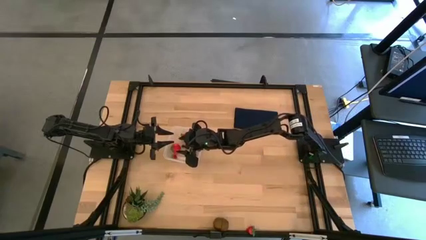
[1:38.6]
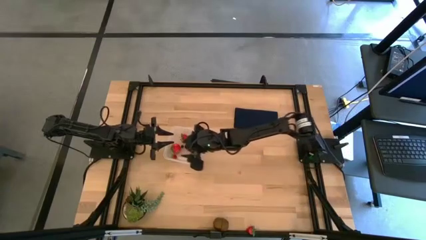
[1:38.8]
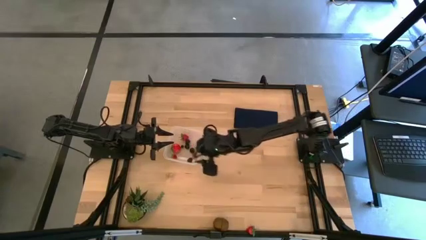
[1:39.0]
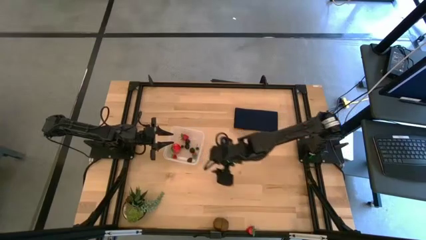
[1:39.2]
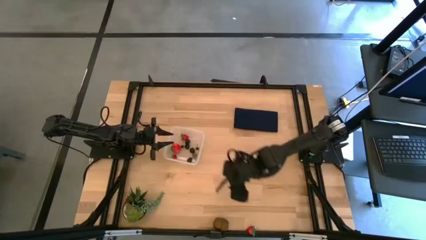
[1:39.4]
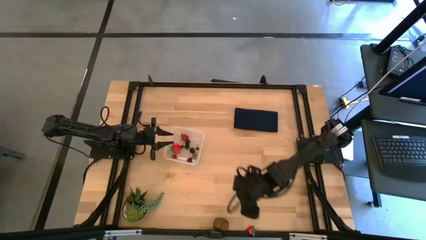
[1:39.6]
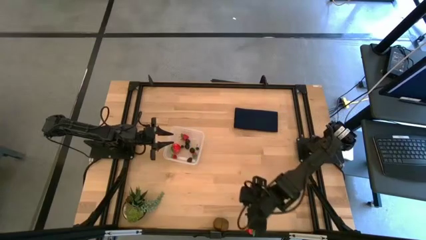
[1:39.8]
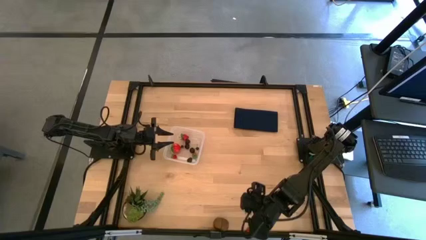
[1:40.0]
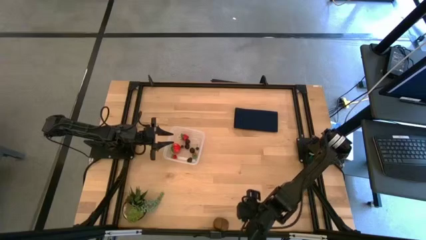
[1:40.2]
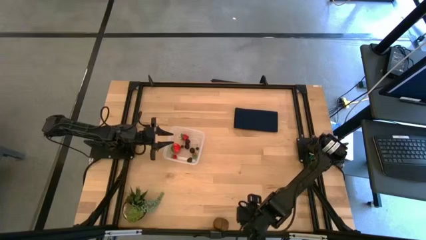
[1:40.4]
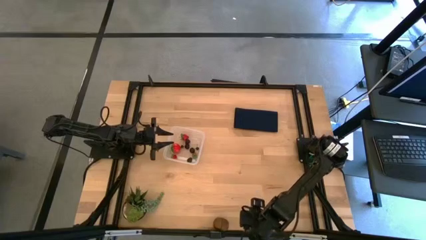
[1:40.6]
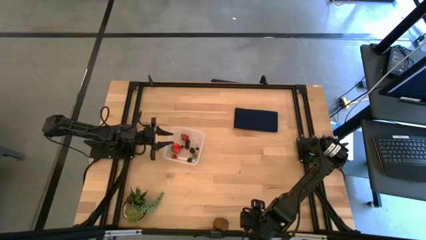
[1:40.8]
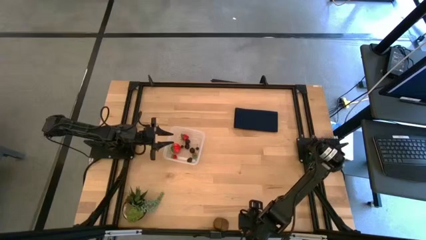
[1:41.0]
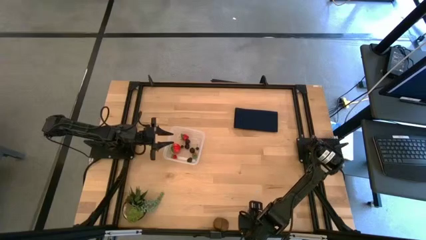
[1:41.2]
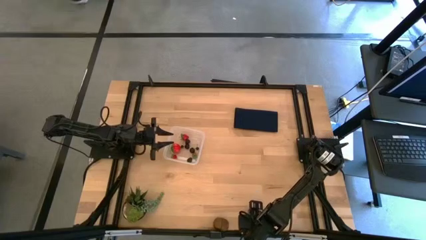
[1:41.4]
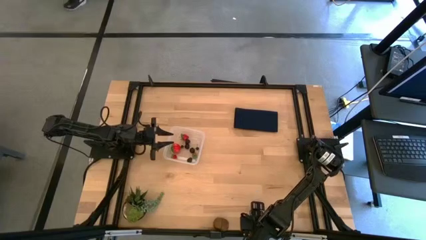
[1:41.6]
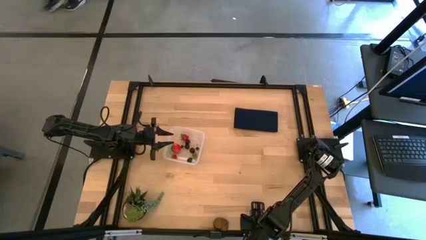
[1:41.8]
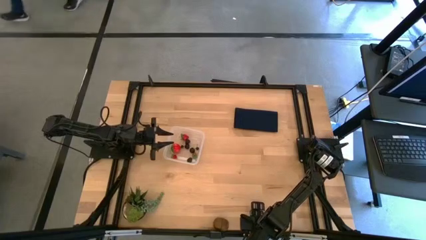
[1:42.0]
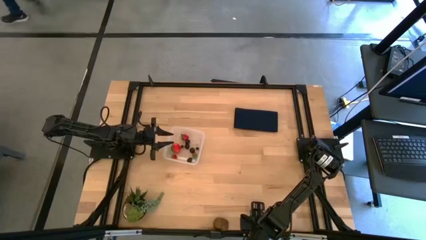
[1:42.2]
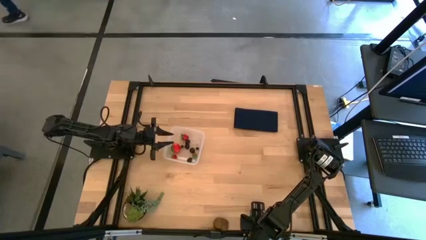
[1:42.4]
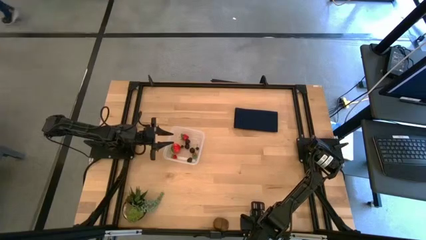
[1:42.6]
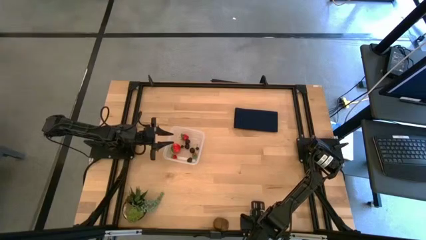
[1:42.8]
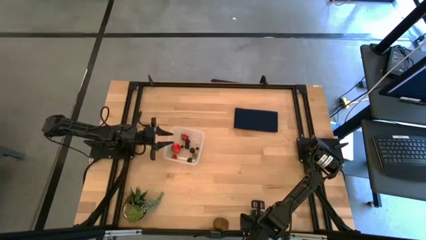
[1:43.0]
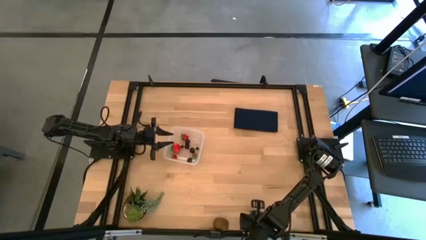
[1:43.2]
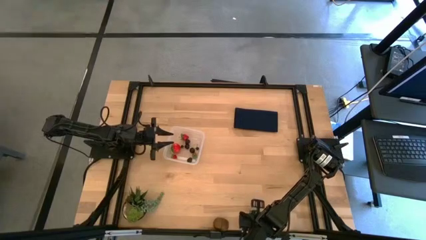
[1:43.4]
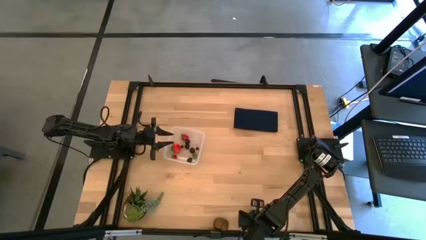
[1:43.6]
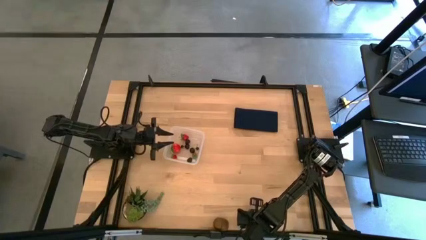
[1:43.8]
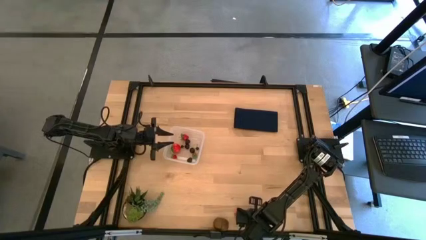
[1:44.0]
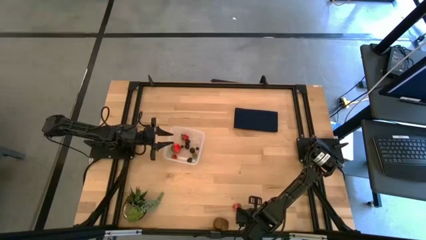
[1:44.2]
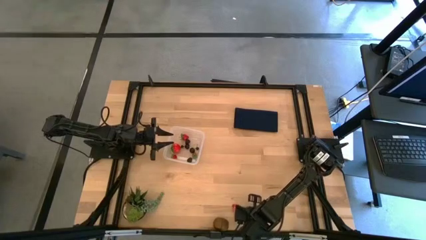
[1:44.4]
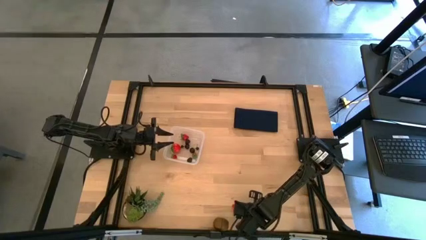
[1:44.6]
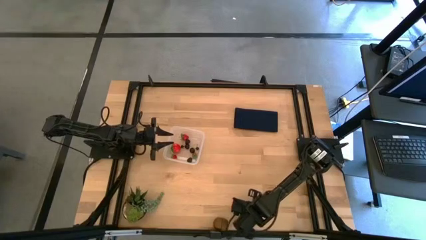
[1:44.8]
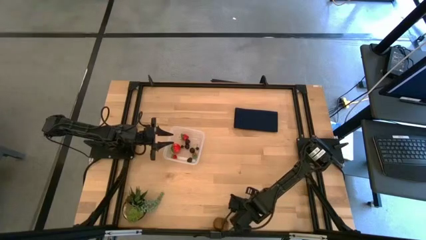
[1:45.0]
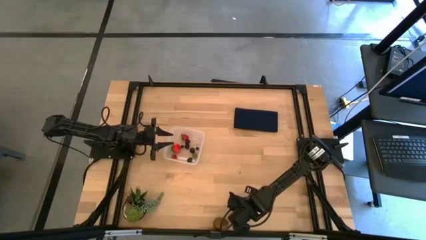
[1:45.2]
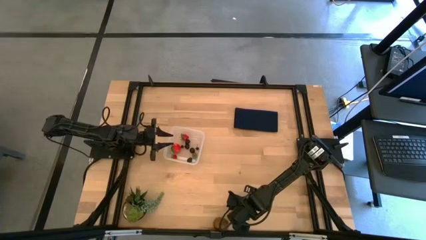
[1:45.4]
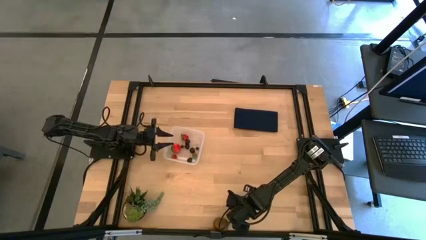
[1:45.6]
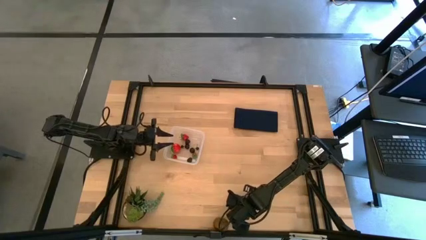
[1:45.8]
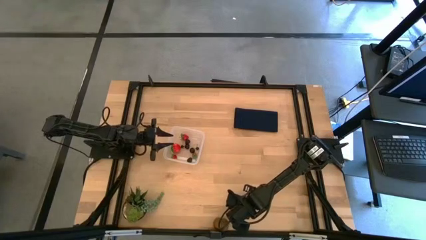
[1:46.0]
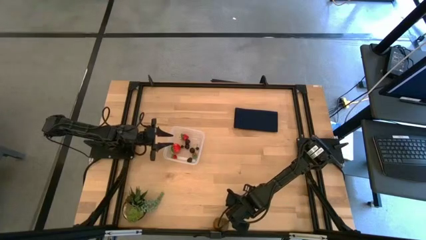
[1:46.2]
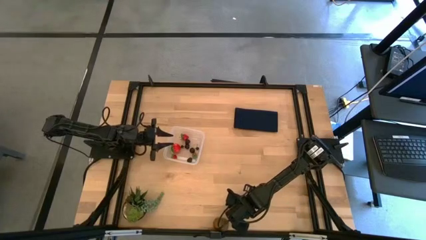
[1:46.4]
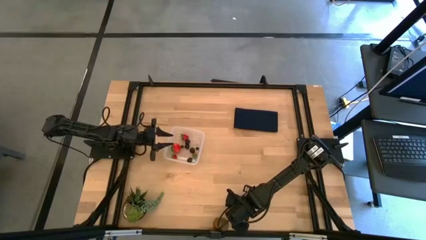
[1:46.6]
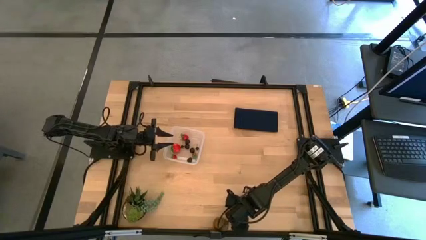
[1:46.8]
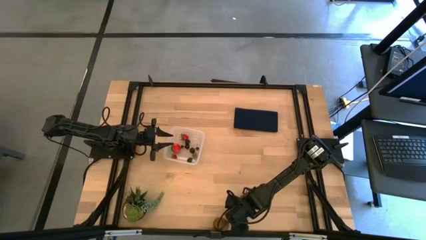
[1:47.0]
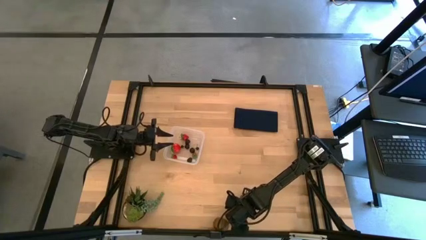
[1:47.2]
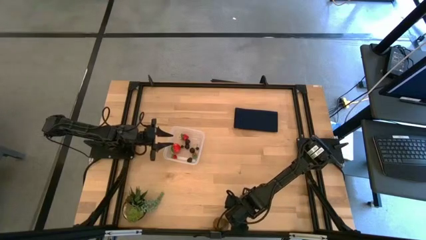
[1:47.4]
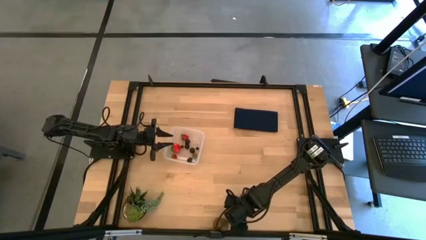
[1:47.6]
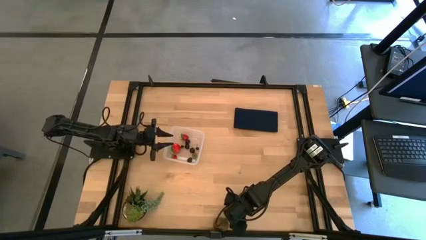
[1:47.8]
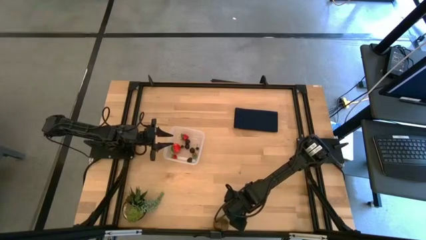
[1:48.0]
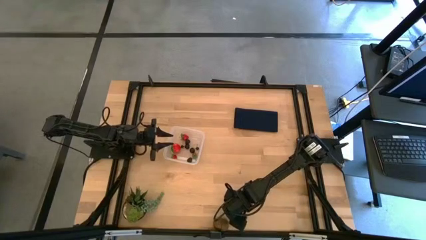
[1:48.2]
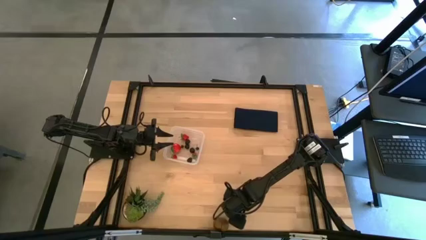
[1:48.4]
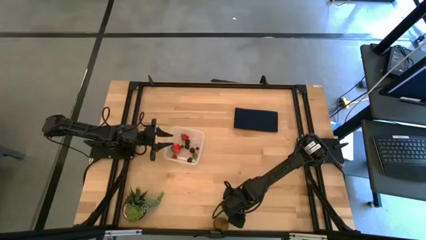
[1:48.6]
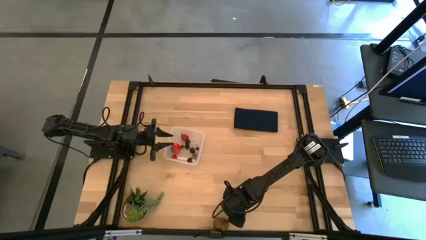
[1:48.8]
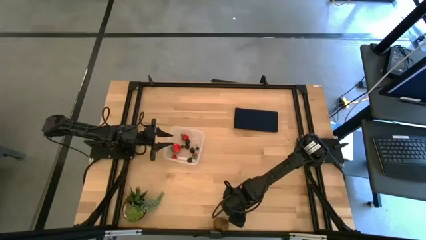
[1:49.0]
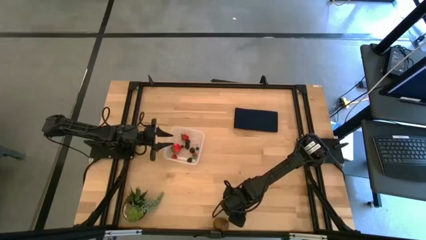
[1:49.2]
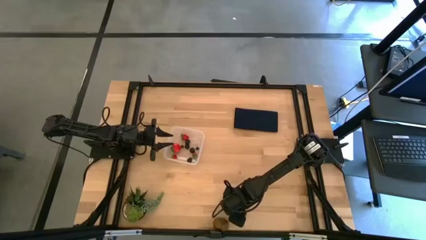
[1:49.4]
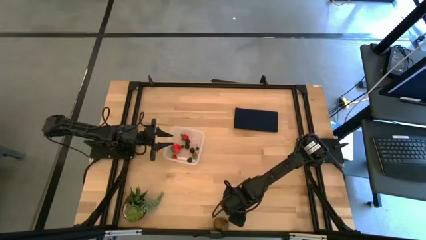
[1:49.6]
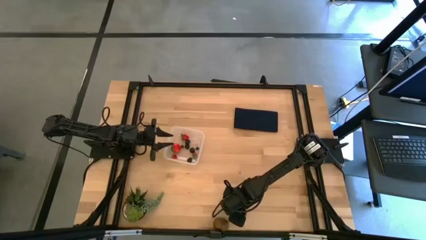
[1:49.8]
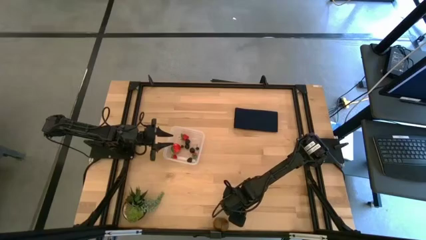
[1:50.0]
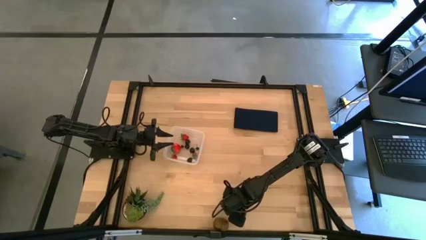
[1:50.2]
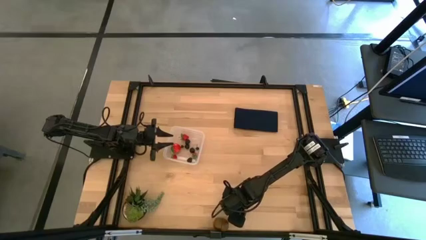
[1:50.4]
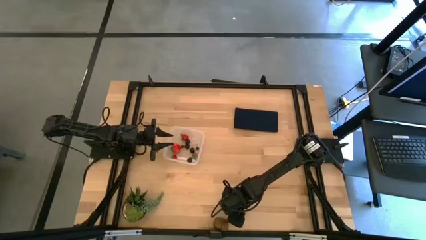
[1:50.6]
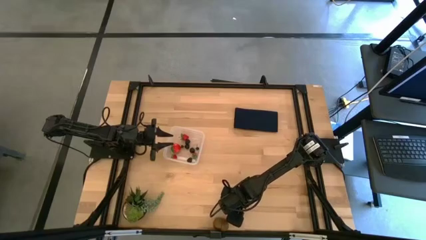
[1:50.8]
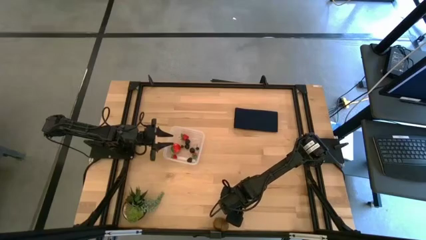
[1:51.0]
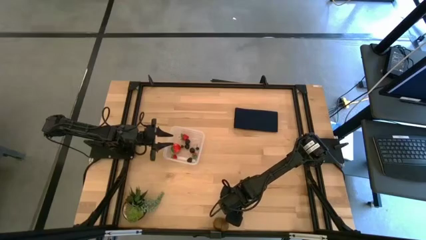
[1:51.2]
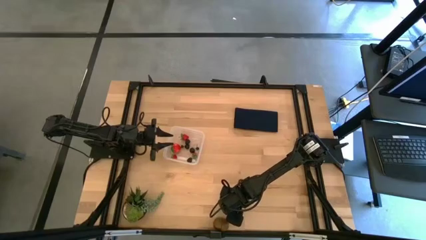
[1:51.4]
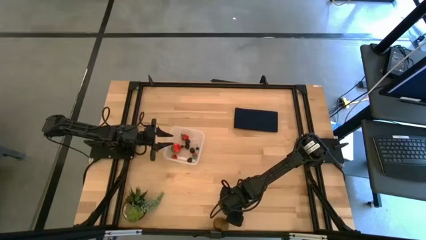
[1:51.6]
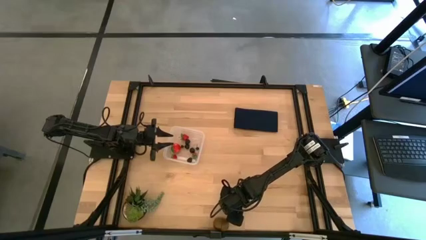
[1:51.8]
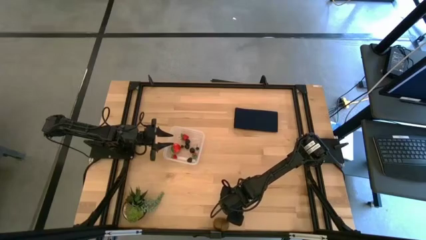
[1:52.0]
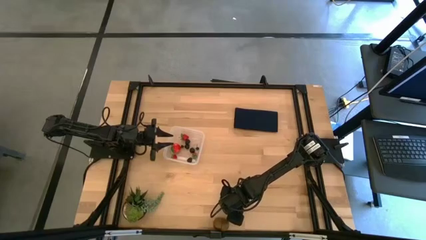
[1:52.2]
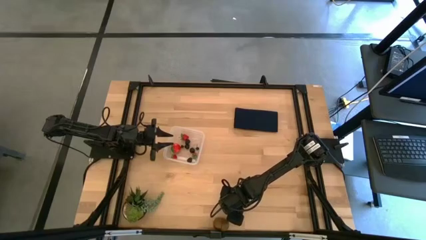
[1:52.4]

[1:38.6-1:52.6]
Task: Pick and placing Produce into tupperware
Put the strawberry into the transparent bin

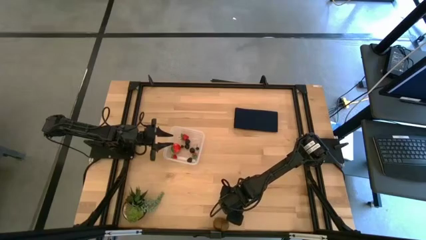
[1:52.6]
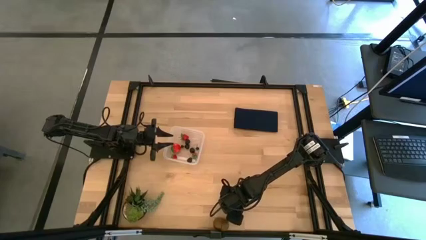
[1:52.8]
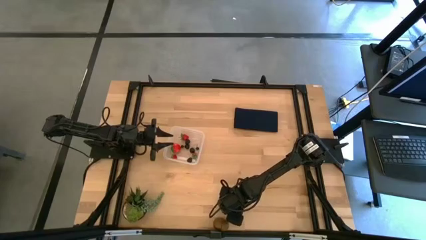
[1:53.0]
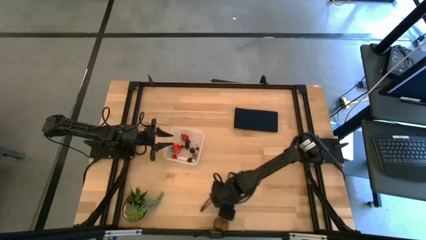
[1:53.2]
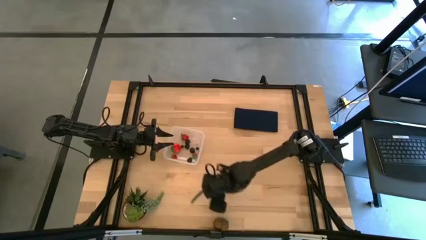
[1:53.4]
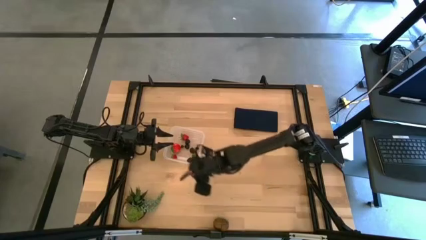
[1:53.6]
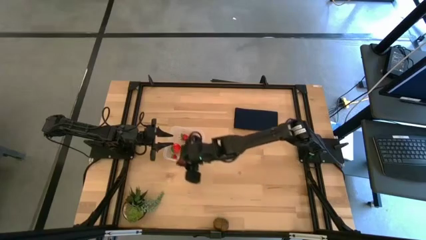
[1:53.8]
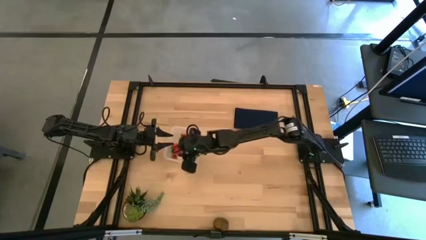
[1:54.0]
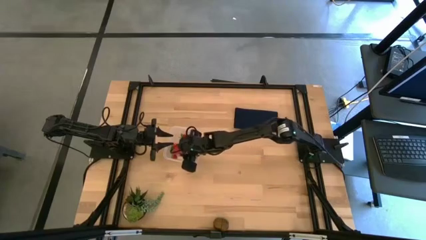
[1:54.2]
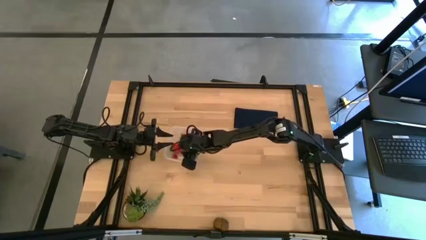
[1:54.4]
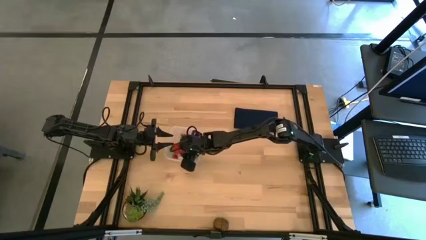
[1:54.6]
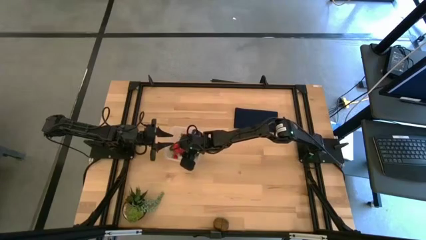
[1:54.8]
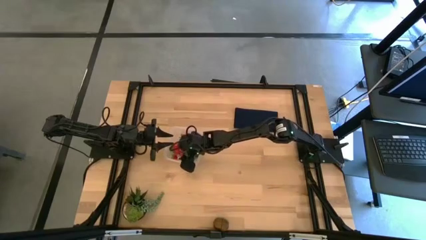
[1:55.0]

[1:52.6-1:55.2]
Put the strawberry into the transparent bin

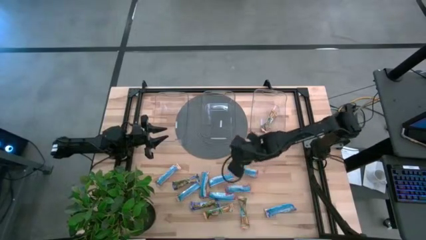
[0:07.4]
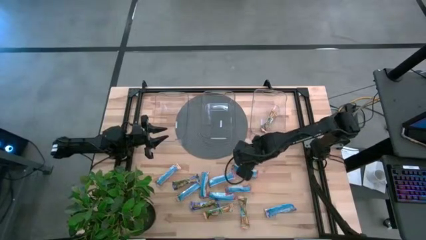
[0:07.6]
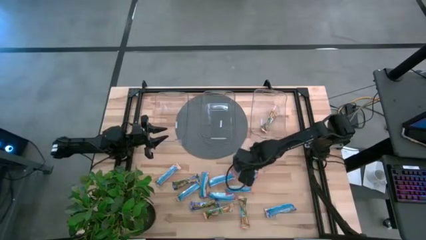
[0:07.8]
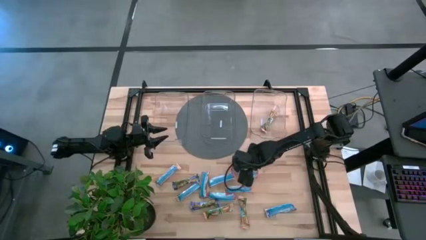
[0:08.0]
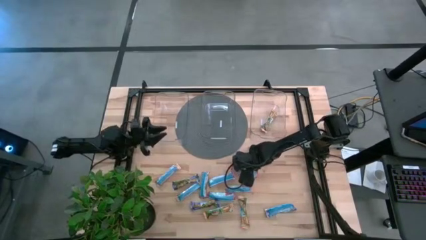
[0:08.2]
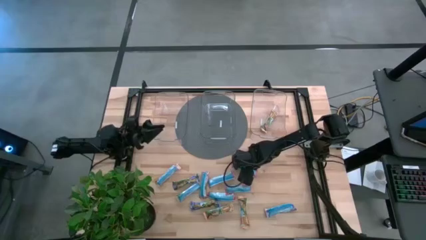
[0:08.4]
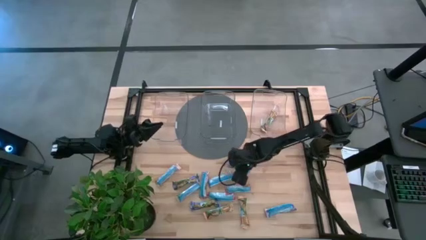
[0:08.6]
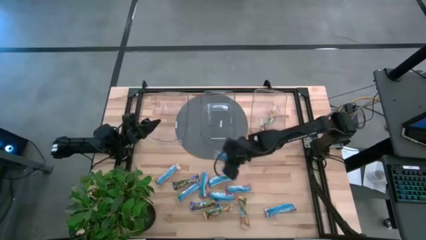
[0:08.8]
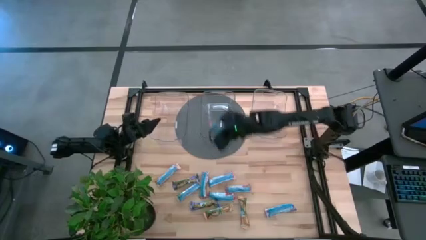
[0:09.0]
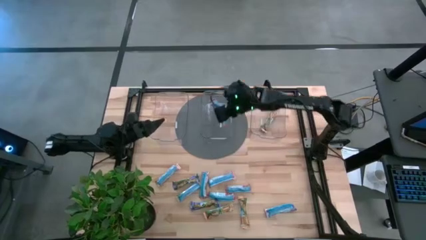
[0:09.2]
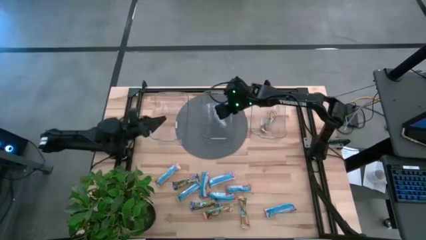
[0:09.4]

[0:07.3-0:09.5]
Task: Pick and place Granola Bars by type
Put the red granola bar into the middle transparent bin
